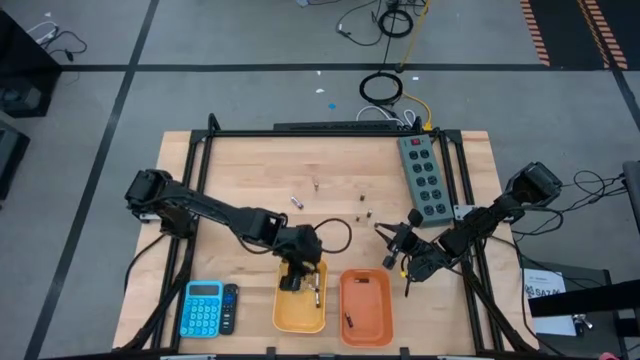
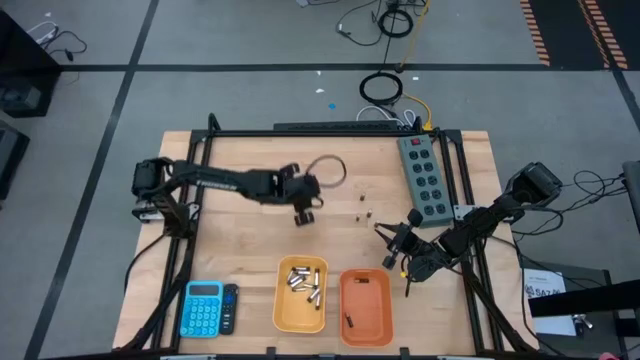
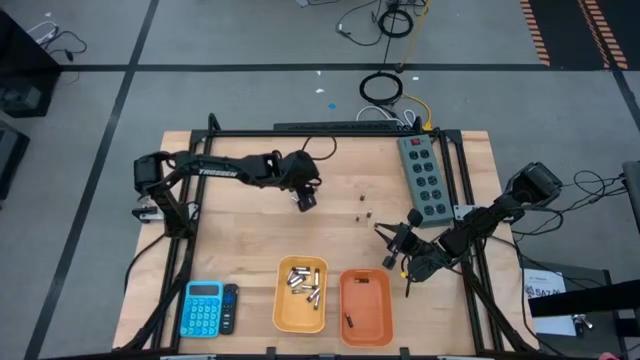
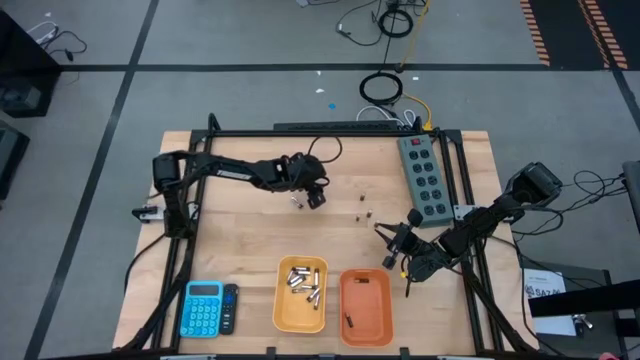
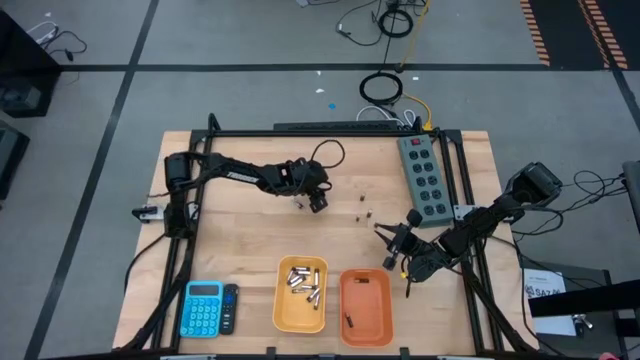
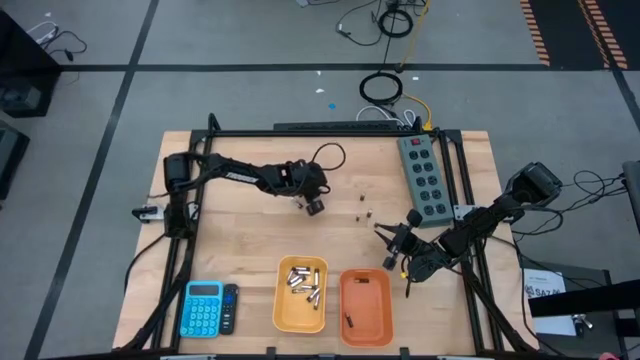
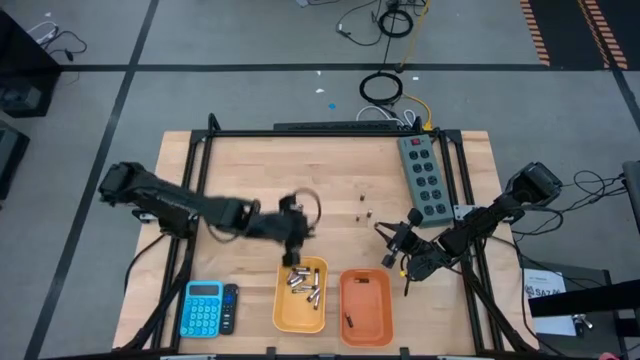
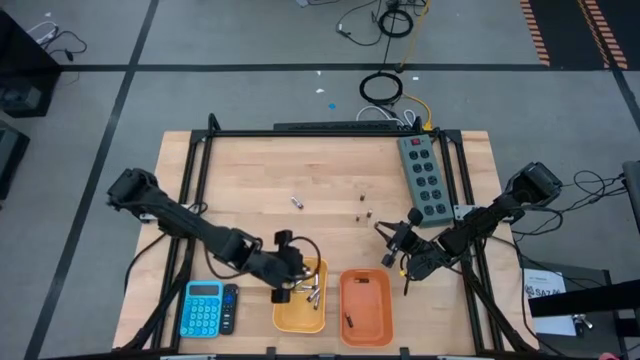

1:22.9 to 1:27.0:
Task: Sort batteries
Put the silver battery into the yellow bin

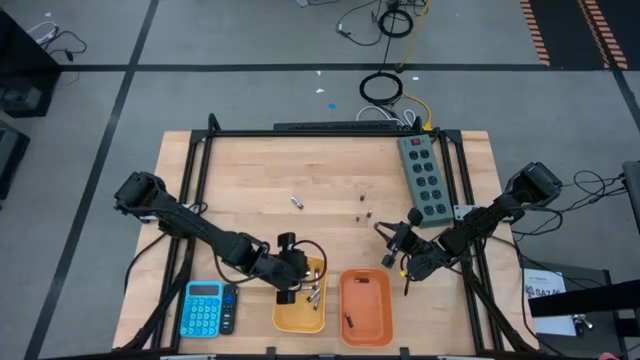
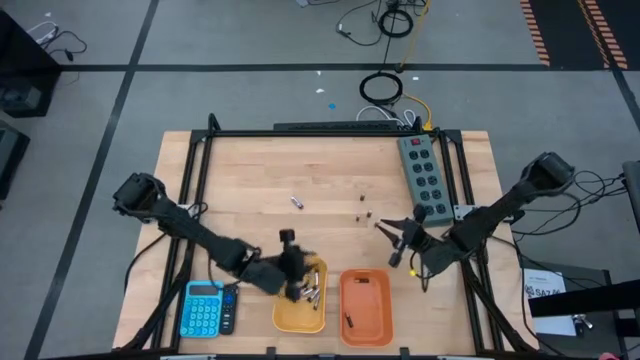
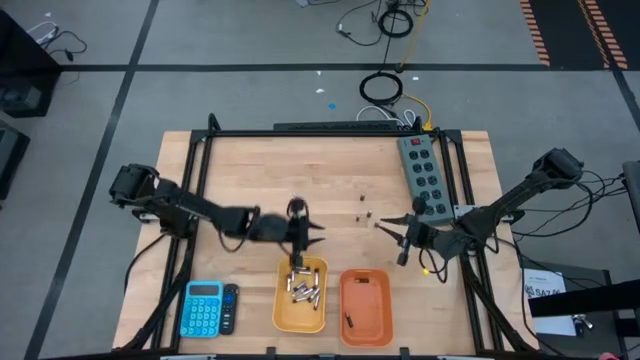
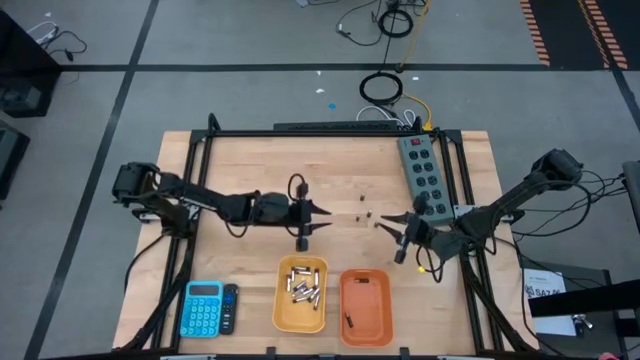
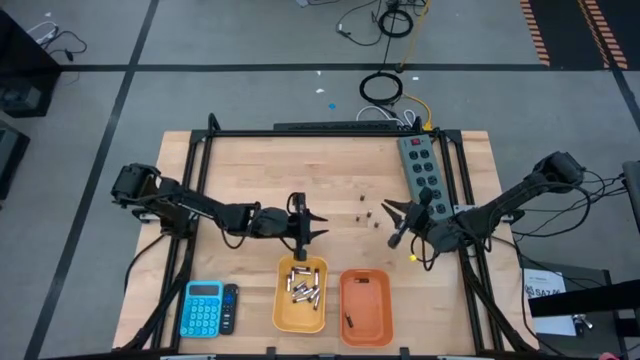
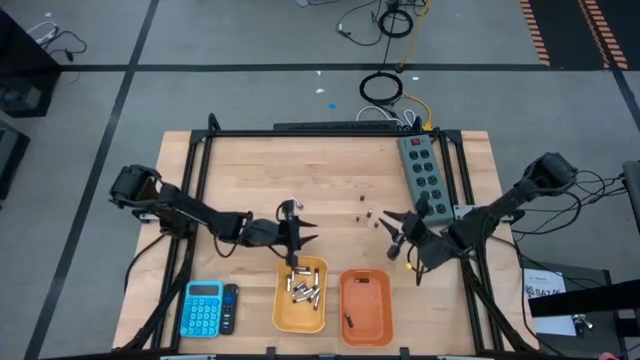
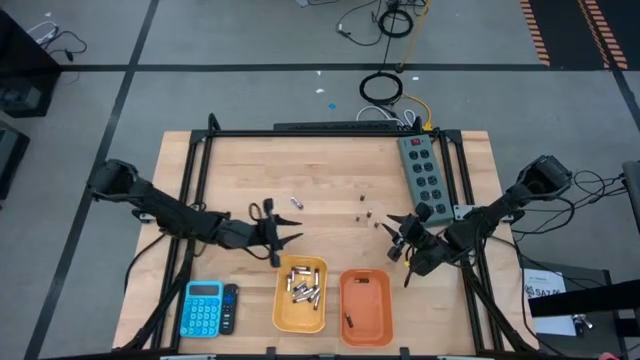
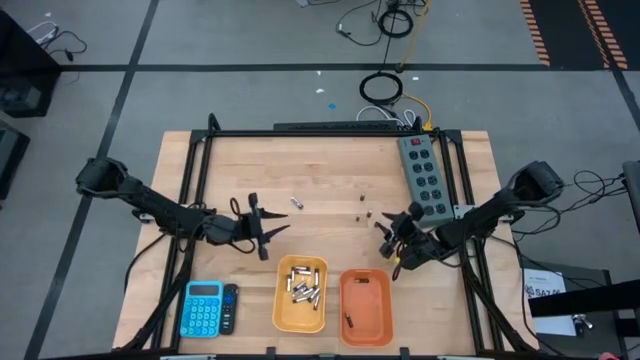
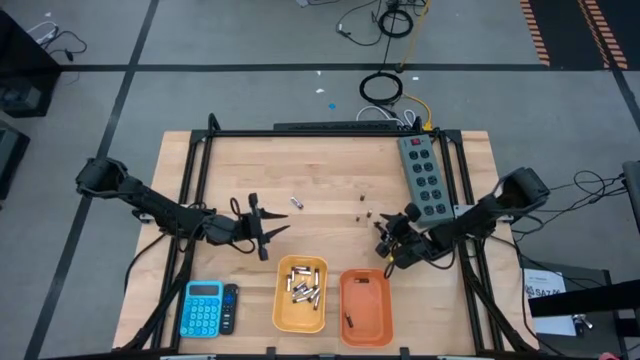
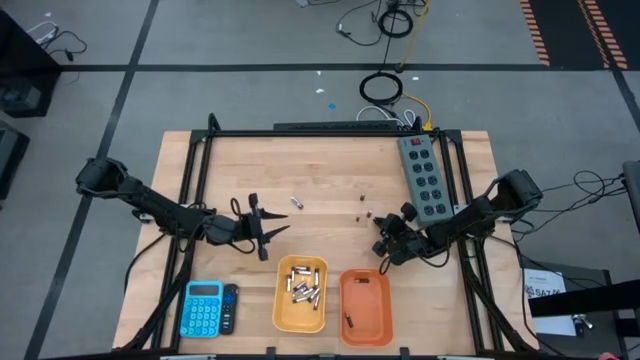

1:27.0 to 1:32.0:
Put the black battery into the orange bin

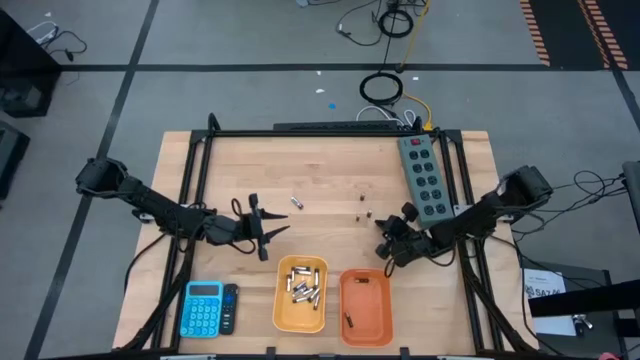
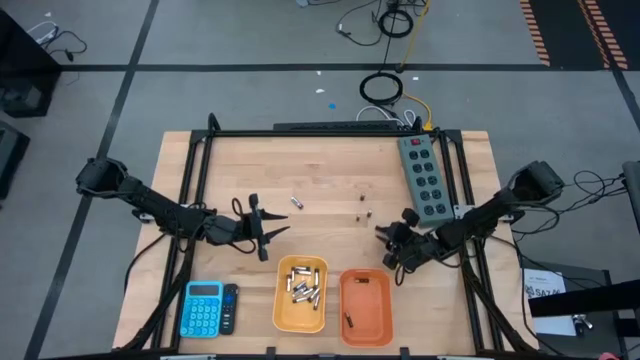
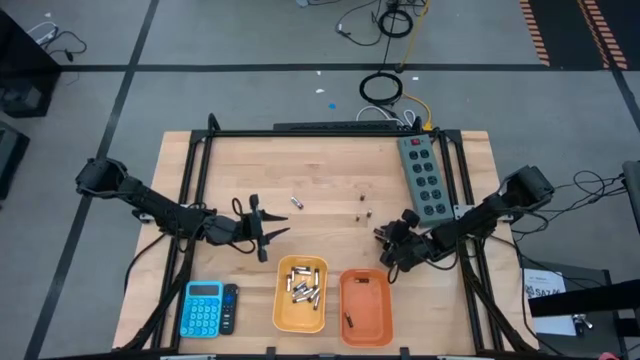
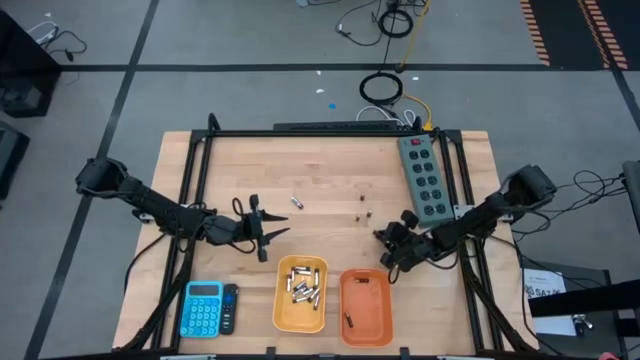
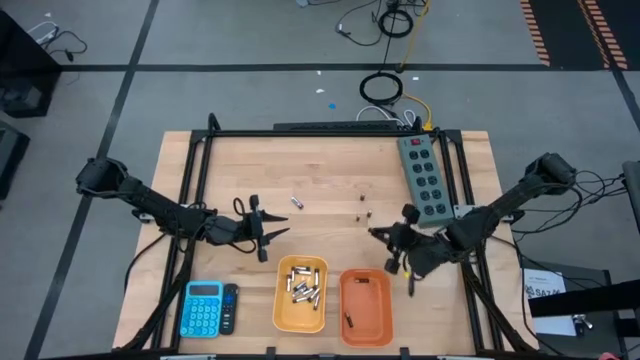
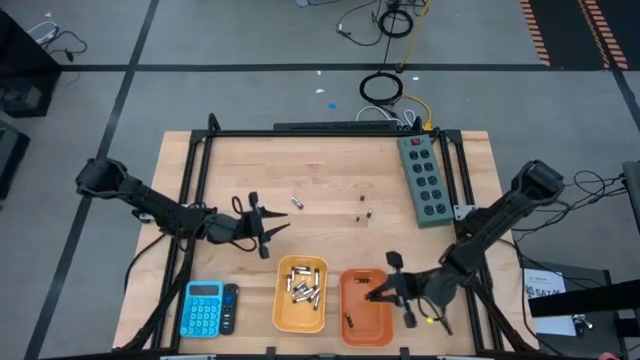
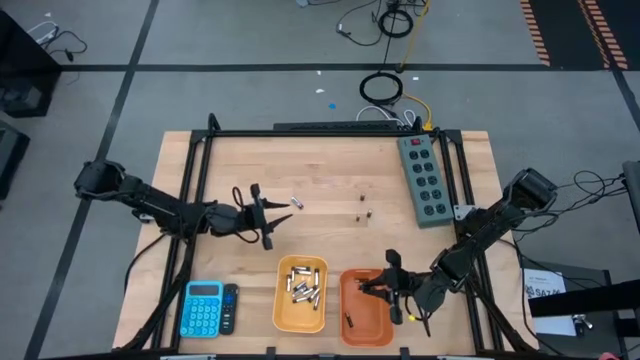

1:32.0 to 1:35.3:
Put the black battery into the orange bin

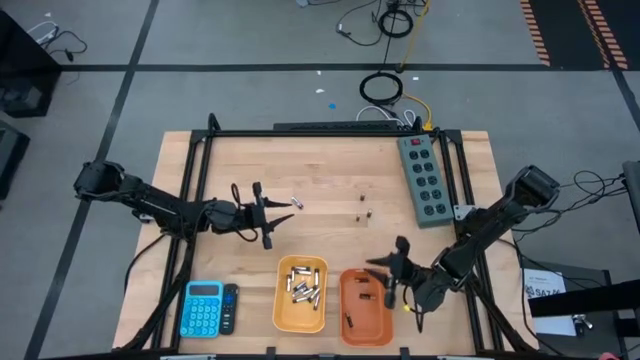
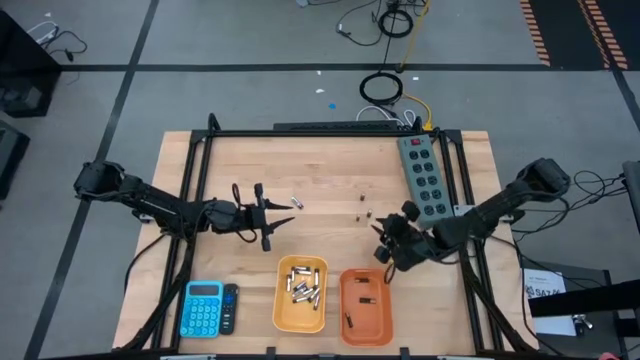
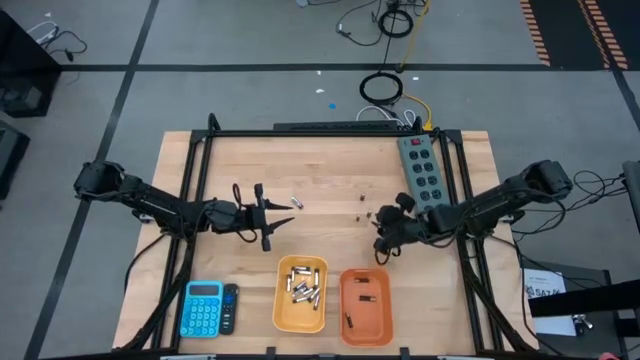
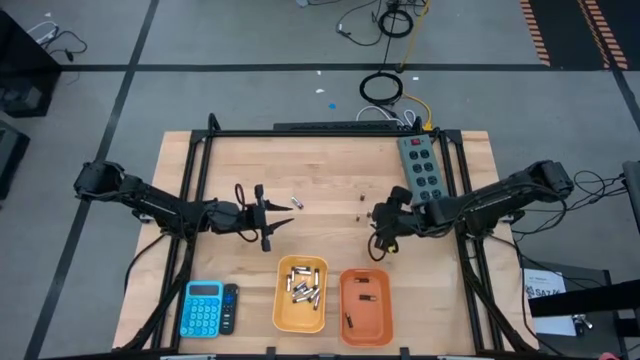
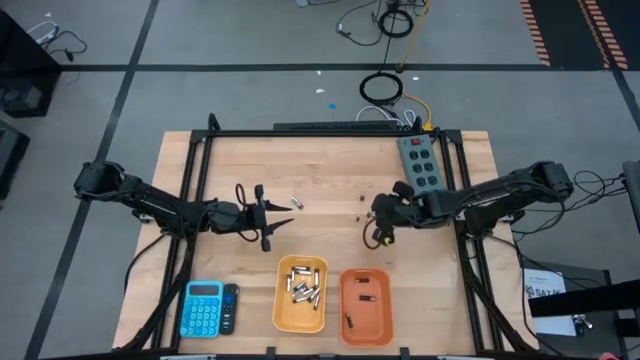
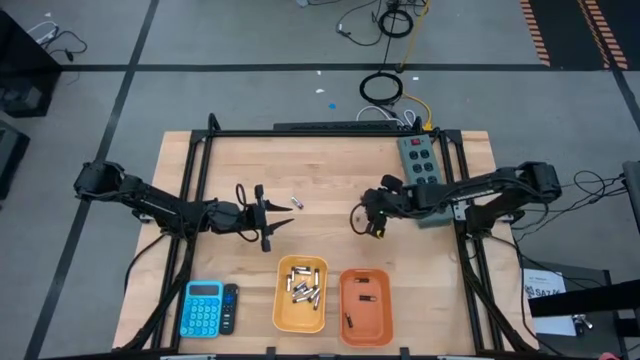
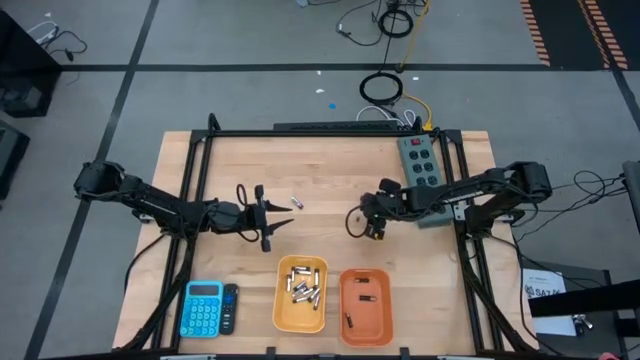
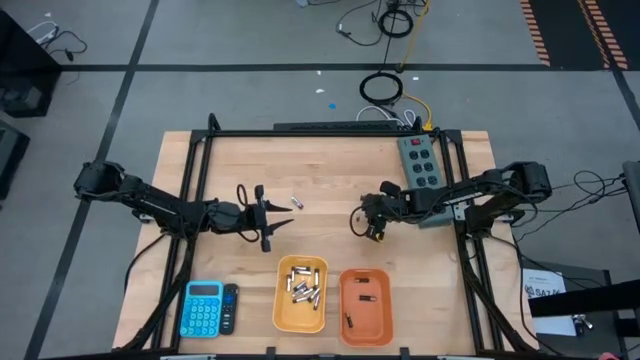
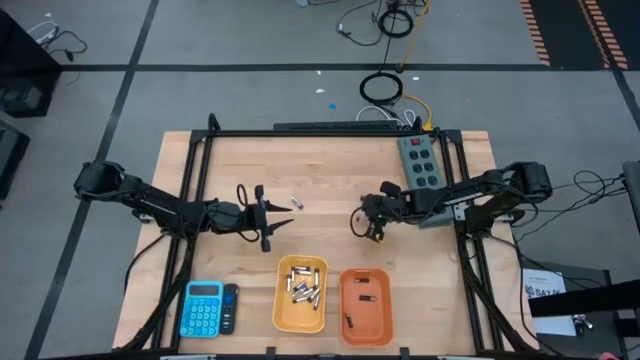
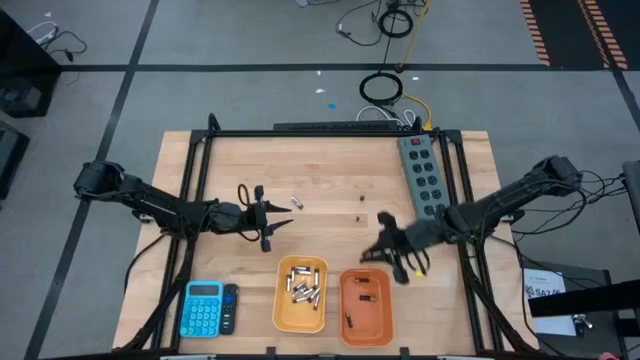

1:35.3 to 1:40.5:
Put the black battery into the orange bin

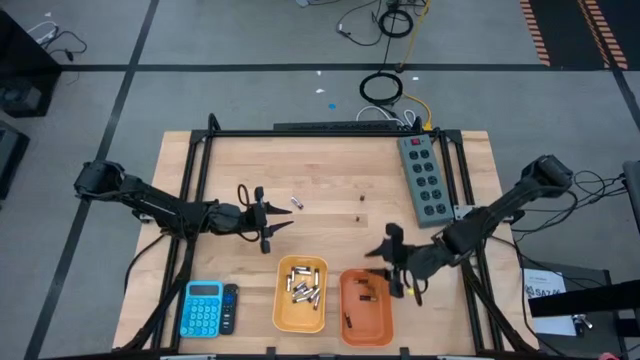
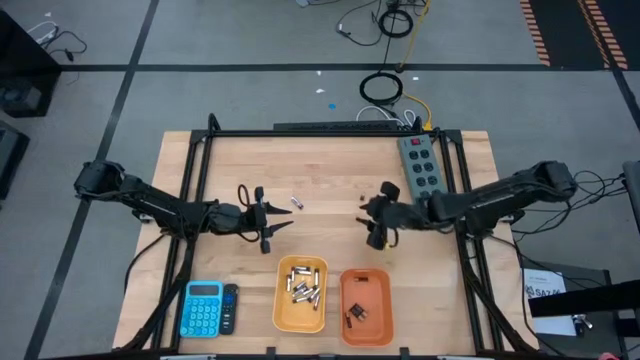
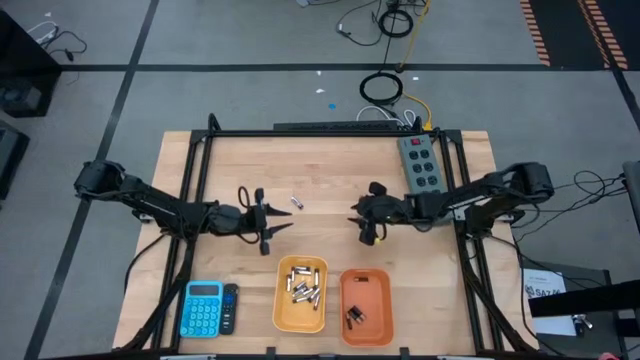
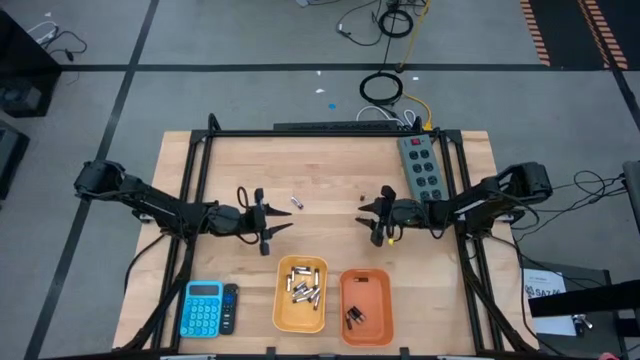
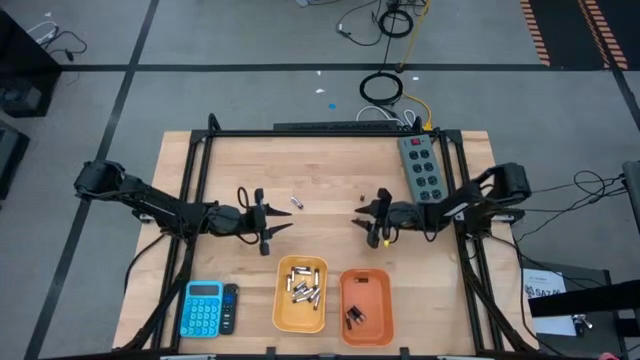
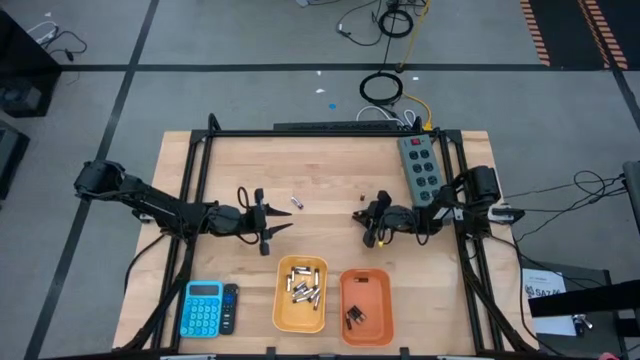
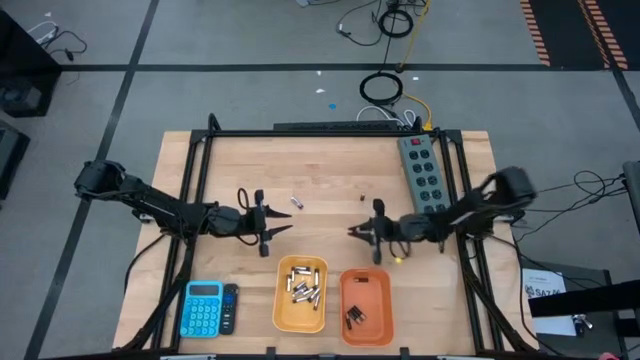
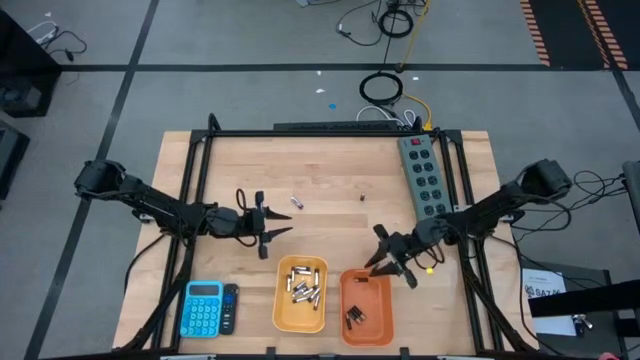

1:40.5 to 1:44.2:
Put the black battery into the orange bin

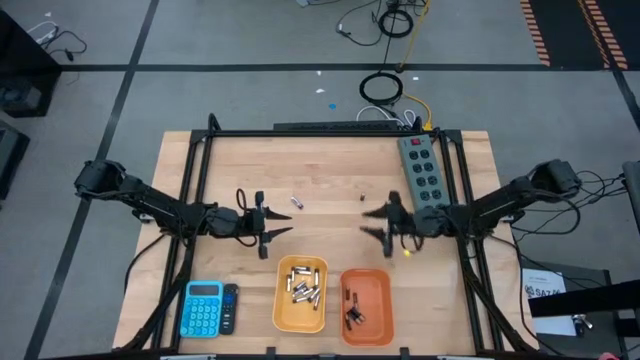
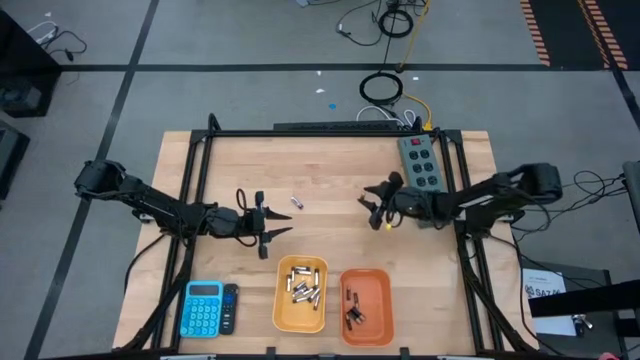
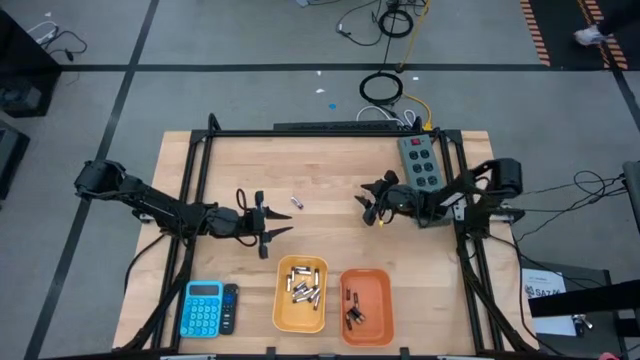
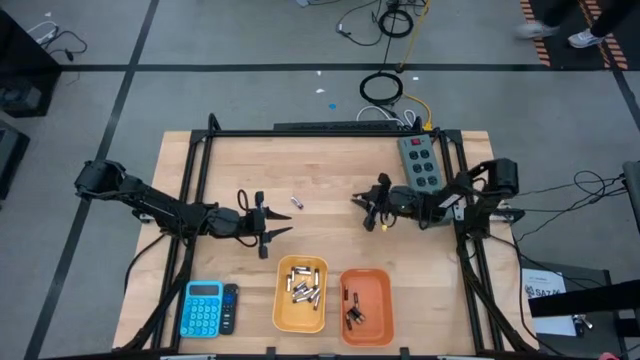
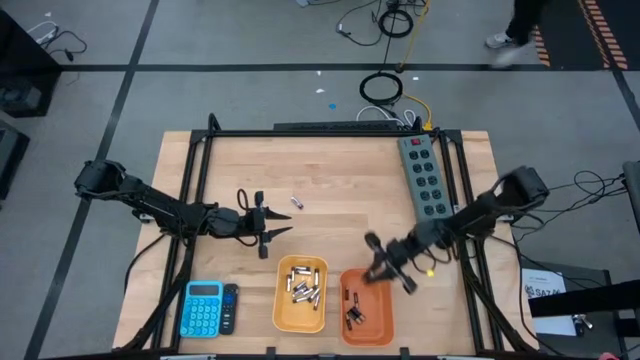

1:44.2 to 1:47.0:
Put the black battery into the orange bin
